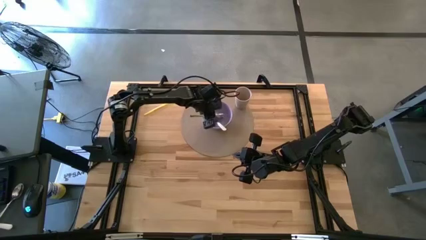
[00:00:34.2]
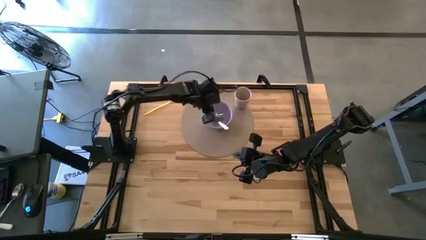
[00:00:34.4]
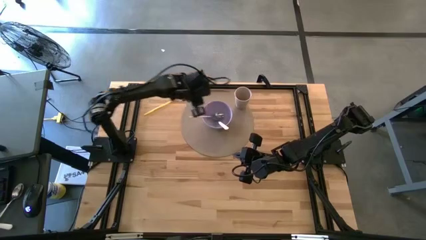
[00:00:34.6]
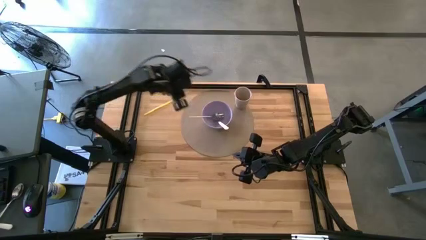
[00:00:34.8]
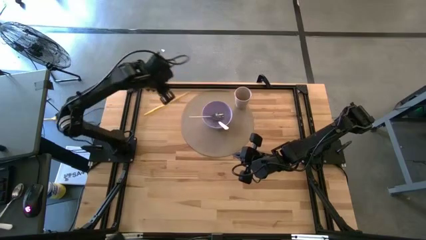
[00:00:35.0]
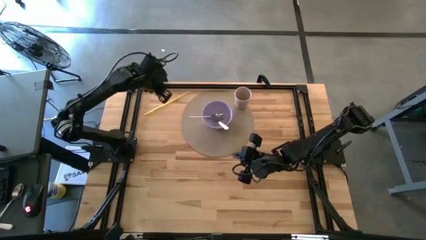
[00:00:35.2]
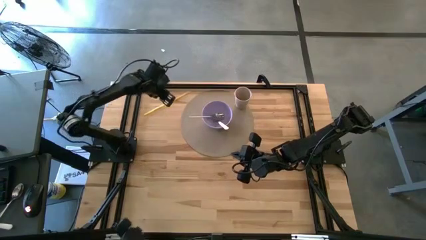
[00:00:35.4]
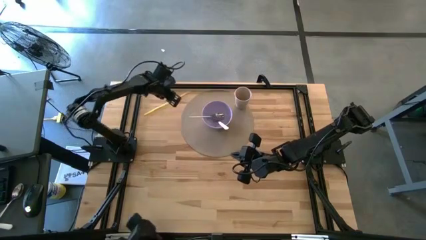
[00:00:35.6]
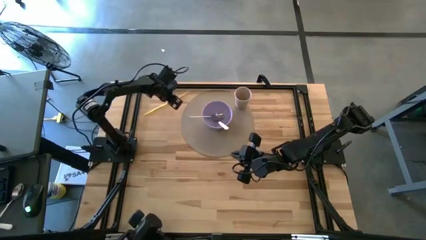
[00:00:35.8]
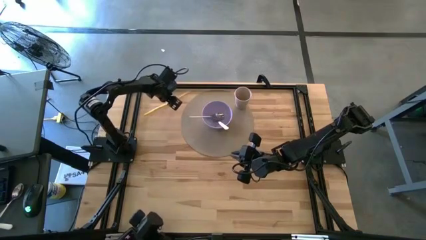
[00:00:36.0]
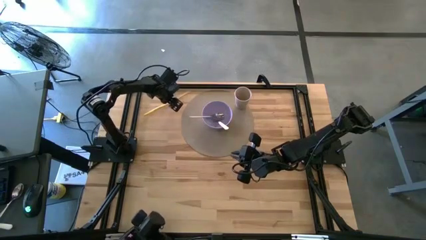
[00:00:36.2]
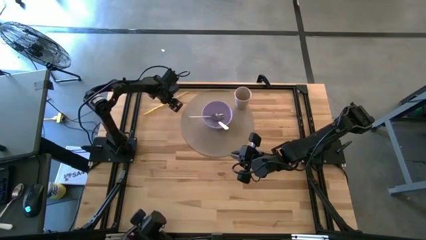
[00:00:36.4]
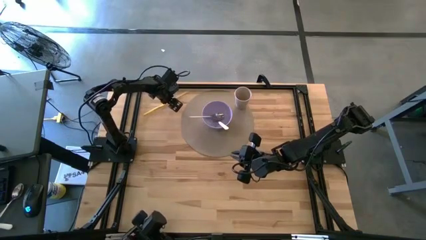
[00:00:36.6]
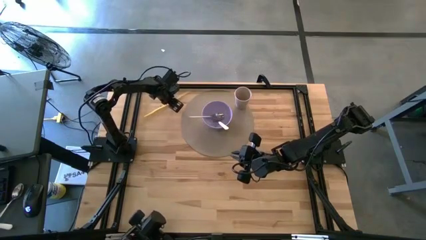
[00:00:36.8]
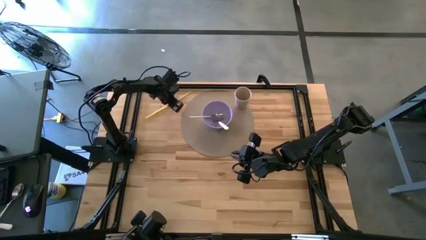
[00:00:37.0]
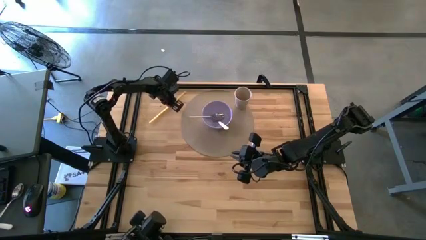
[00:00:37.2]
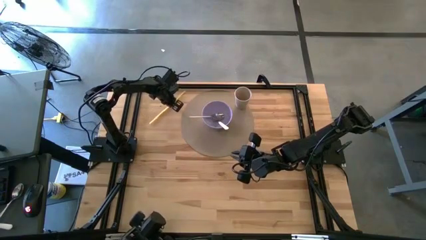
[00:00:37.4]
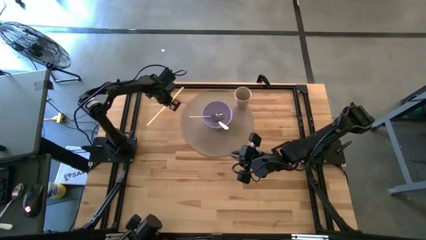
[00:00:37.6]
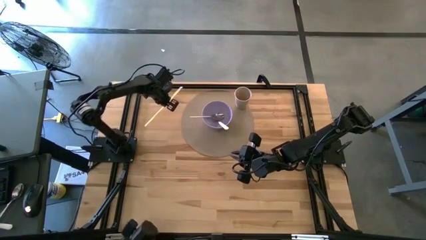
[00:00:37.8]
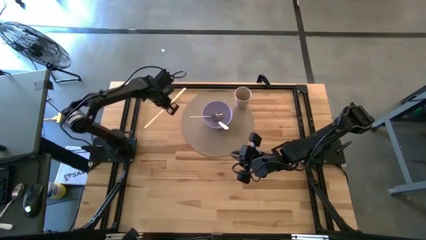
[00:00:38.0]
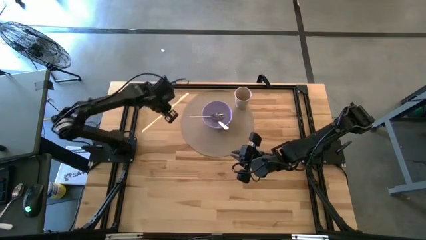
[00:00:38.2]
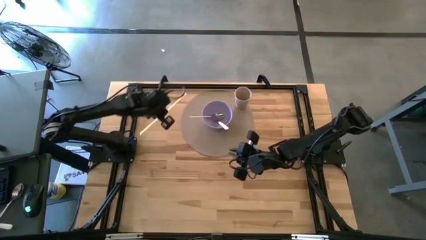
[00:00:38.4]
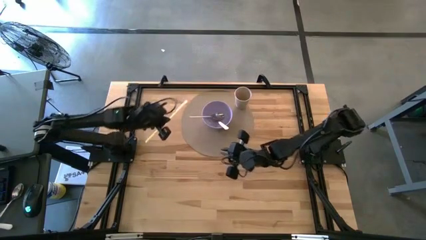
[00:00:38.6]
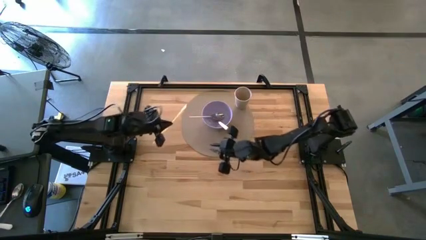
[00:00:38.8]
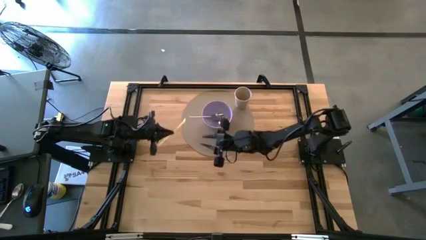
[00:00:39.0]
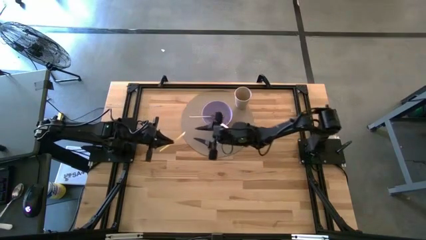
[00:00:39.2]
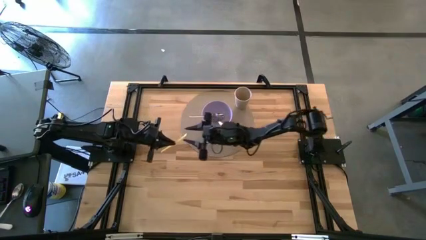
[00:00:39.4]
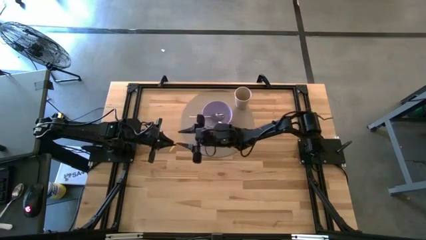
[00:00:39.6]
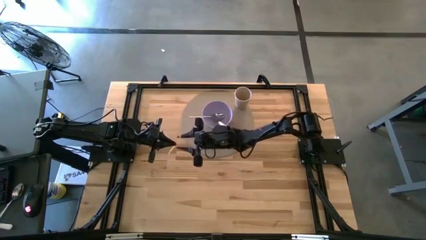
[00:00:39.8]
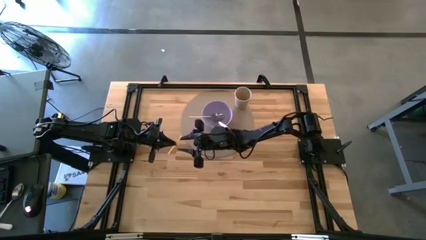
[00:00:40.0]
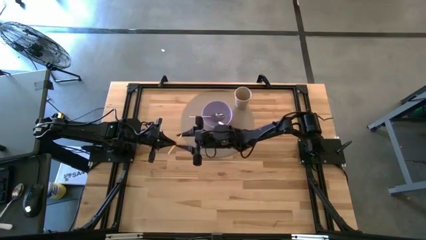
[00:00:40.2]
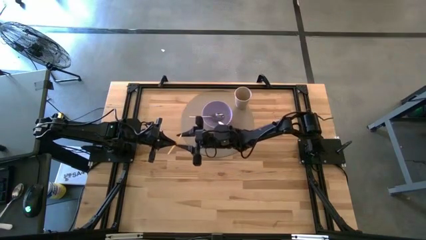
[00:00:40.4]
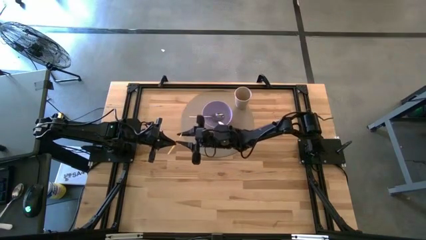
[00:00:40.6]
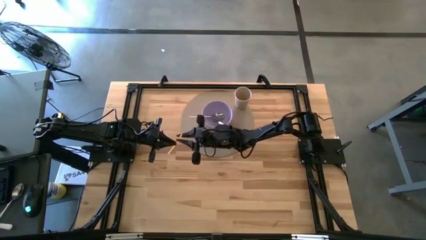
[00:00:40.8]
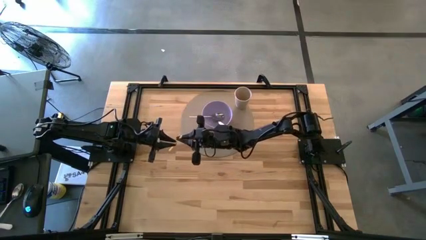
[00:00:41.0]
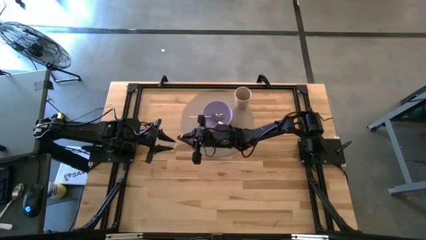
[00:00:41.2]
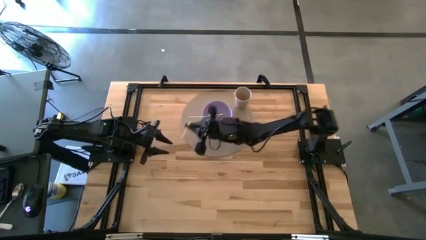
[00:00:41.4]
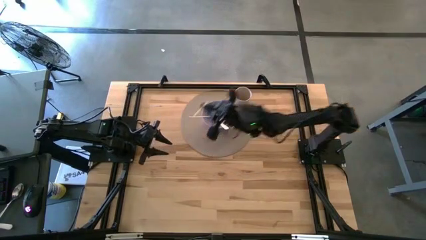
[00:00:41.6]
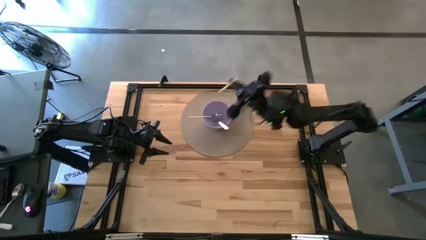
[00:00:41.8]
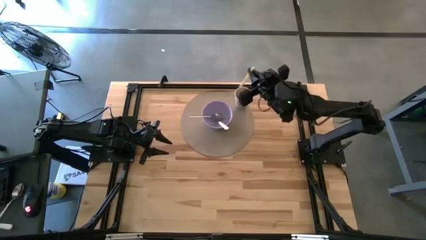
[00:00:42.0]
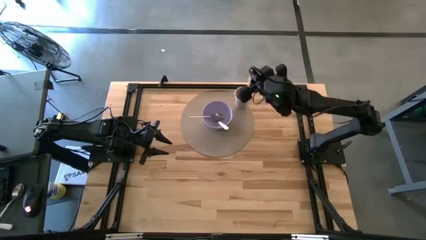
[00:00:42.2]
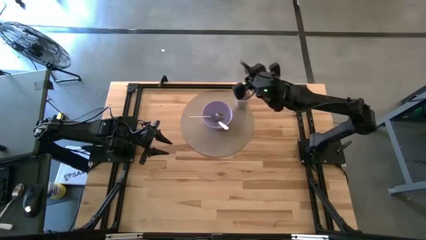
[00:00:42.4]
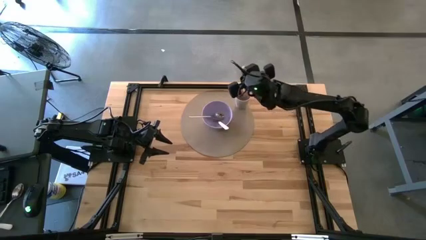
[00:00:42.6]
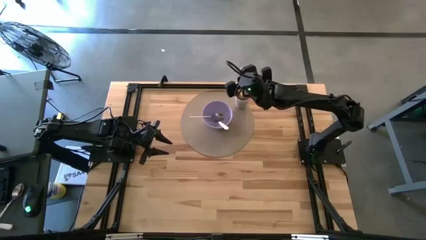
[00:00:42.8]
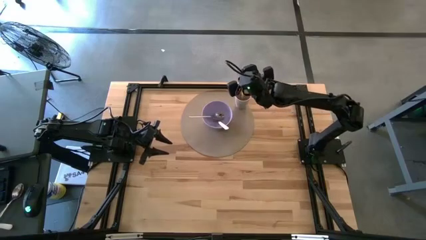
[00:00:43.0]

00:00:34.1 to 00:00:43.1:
Task: Pick & Place Utensil
Put the yellow straw into the brown cup on the brown mat

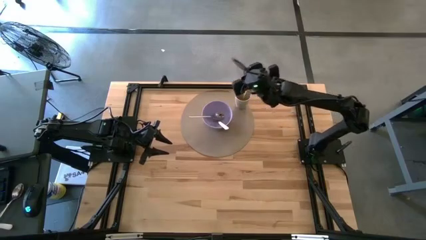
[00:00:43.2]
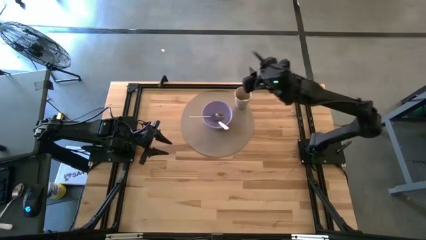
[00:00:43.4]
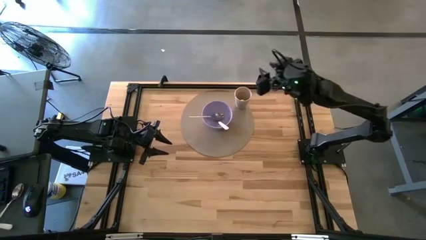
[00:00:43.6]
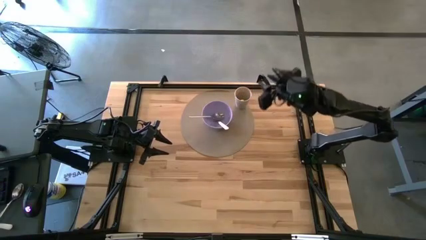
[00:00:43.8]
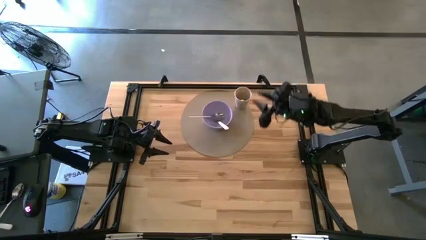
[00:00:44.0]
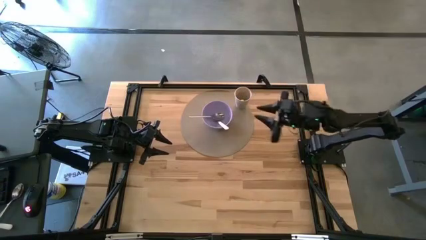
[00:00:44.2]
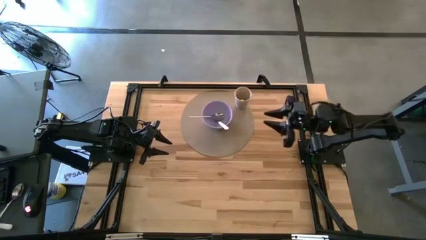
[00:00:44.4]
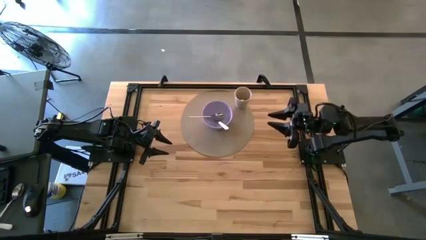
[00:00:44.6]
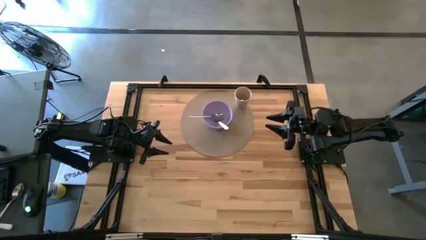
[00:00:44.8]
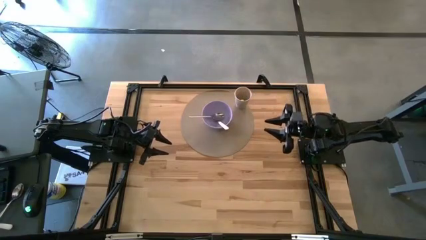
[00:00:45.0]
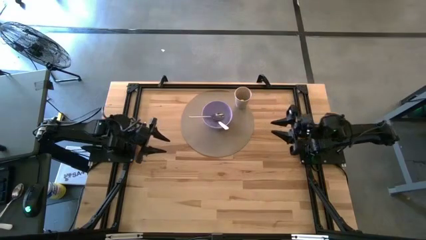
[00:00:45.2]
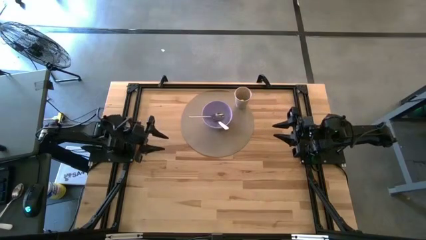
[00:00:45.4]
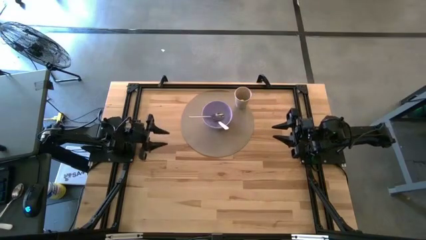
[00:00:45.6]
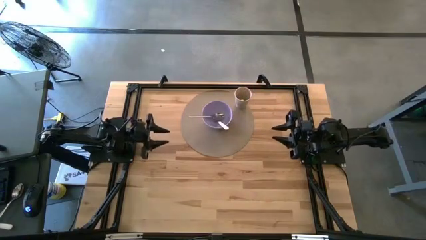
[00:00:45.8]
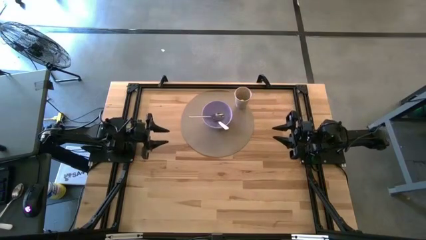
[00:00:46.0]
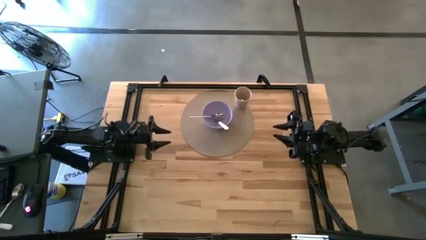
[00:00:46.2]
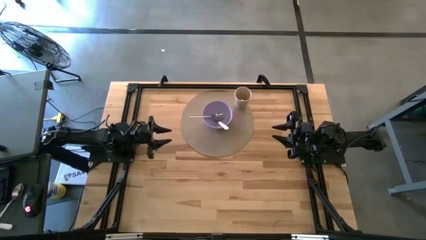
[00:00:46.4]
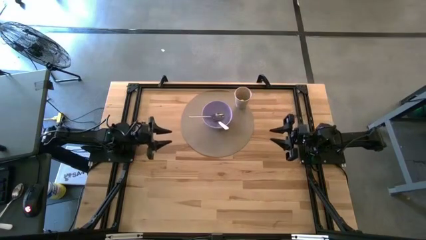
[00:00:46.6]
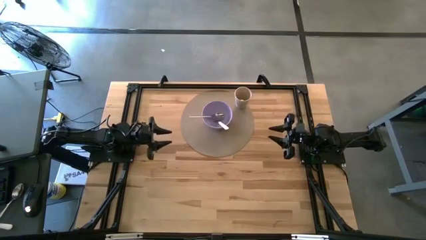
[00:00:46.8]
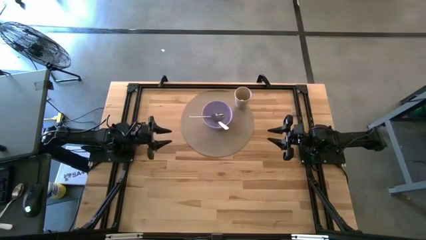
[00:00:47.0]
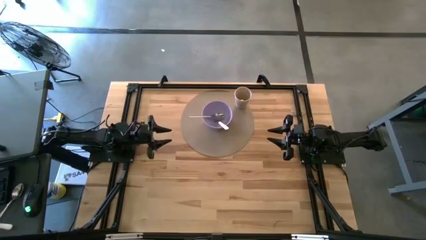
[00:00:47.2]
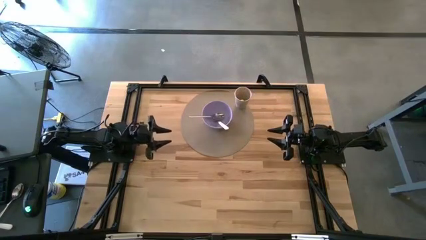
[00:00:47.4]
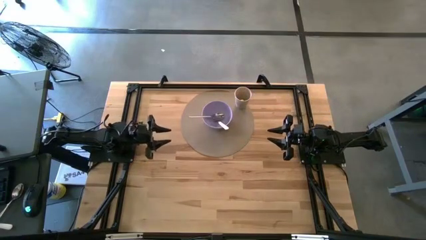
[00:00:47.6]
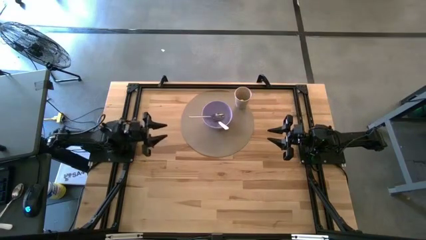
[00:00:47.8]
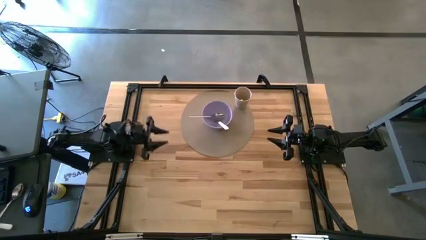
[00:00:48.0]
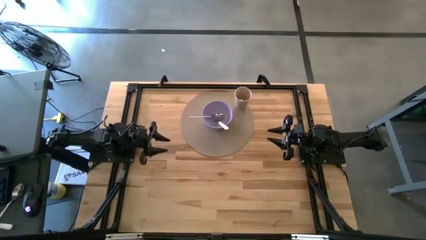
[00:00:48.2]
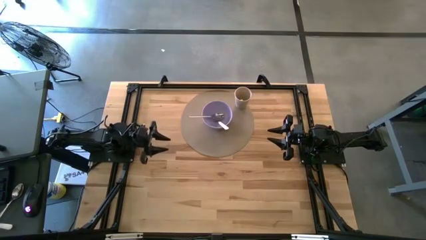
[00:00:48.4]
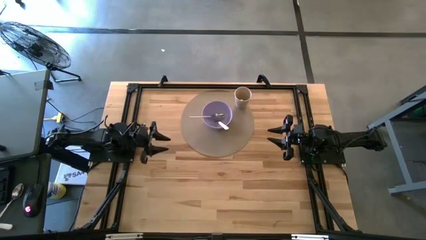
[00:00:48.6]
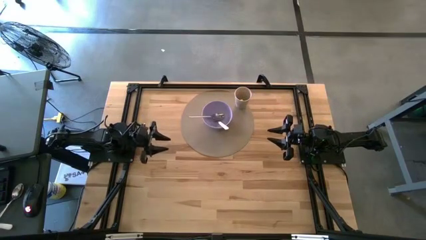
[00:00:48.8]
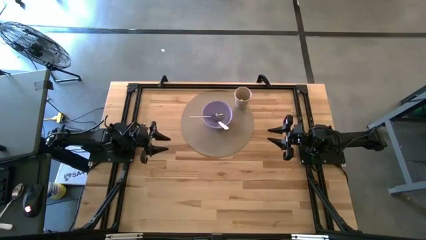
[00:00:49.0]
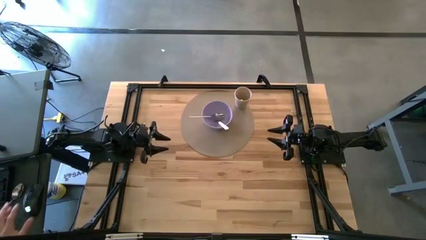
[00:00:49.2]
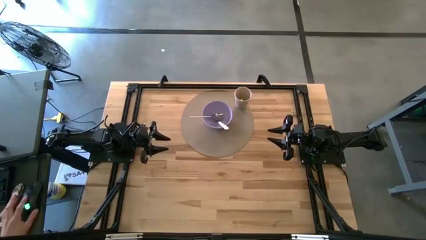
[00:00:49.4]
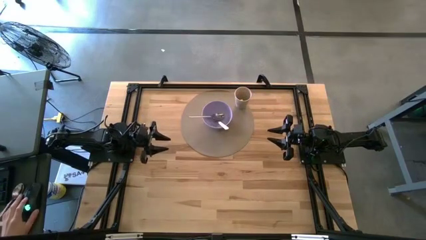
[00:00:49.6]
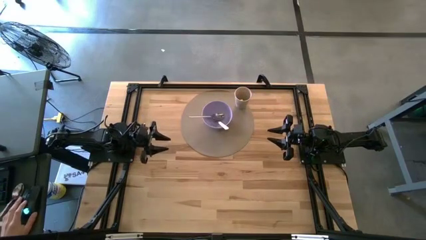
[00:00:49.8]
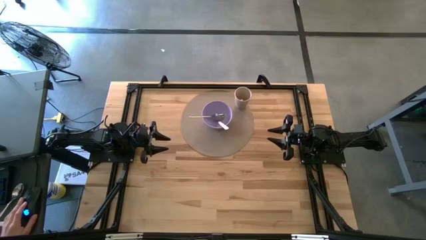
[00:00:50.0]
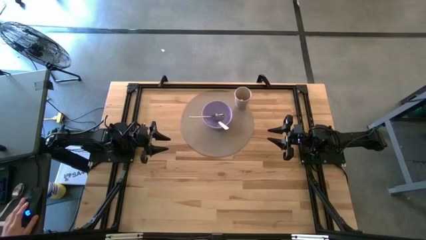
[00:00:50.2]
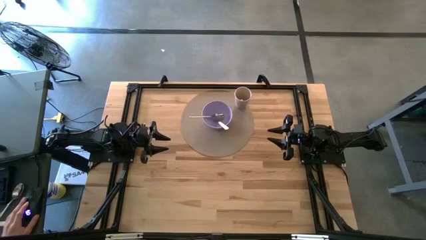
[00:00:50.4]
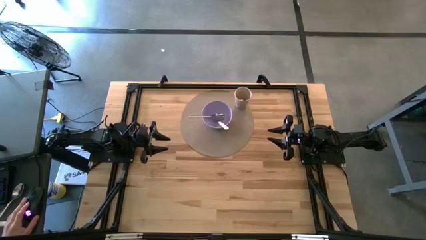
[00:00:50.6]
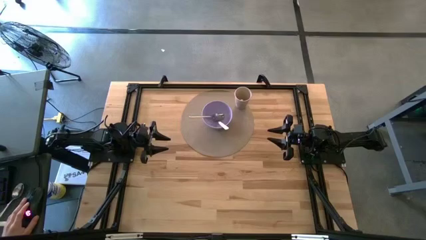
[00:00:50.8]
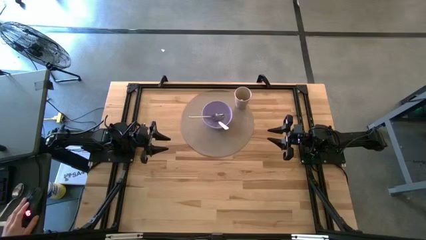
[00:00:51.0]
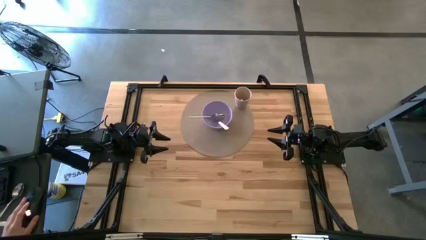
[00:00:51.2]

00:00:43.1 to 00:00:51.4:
Return to Home Position
